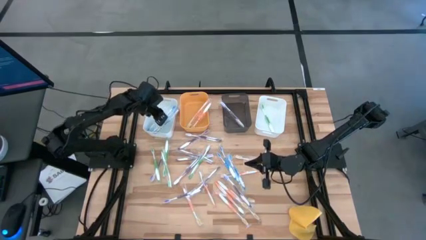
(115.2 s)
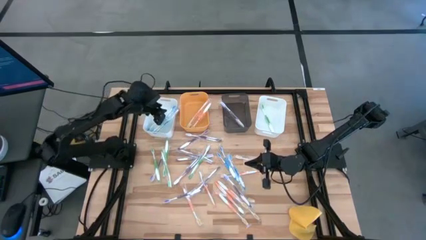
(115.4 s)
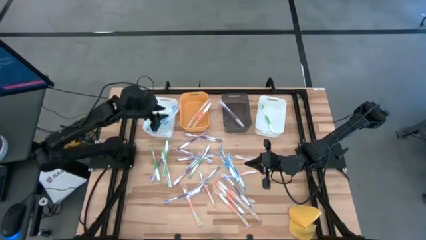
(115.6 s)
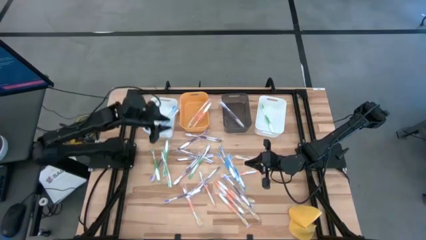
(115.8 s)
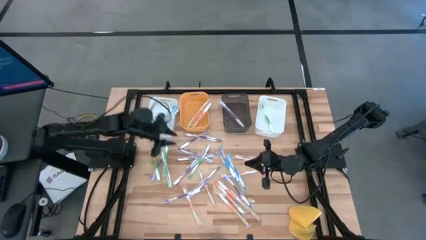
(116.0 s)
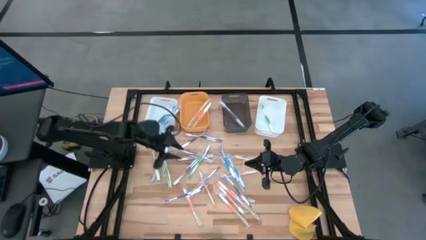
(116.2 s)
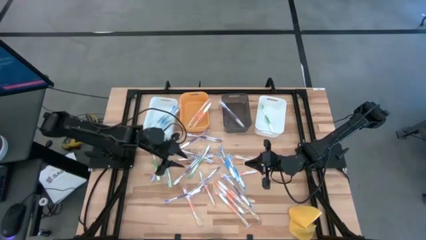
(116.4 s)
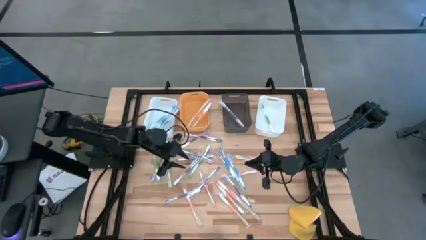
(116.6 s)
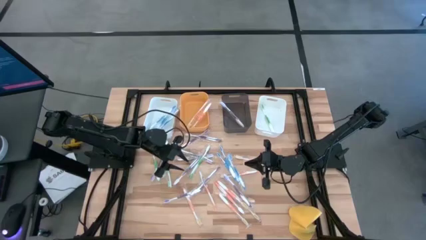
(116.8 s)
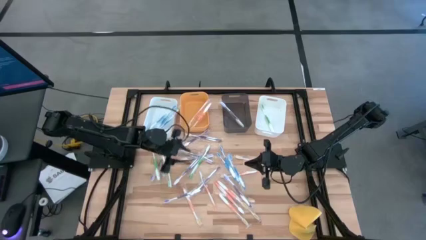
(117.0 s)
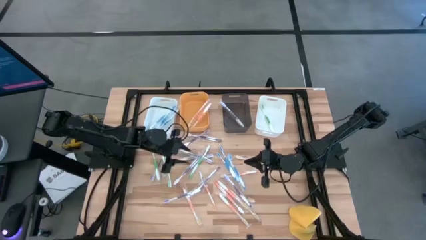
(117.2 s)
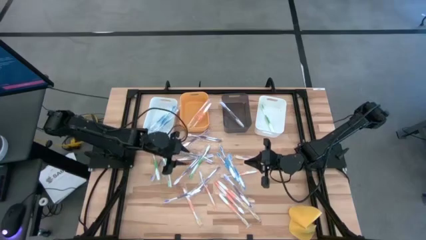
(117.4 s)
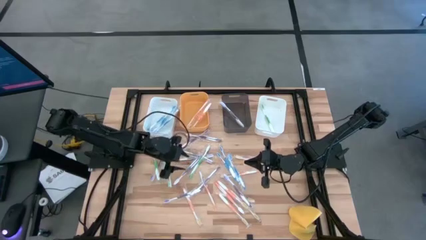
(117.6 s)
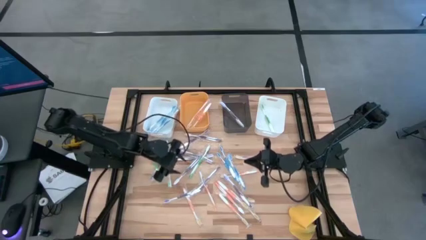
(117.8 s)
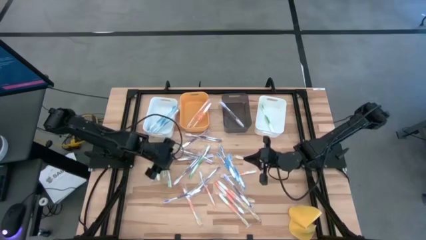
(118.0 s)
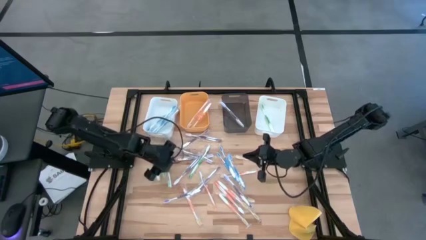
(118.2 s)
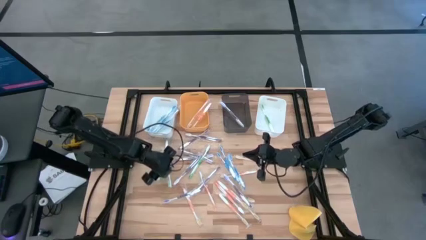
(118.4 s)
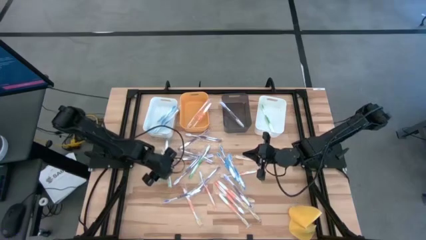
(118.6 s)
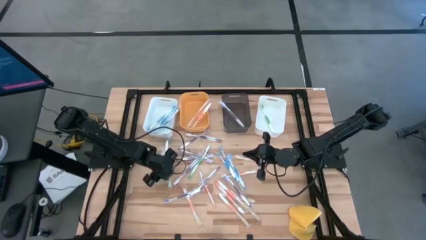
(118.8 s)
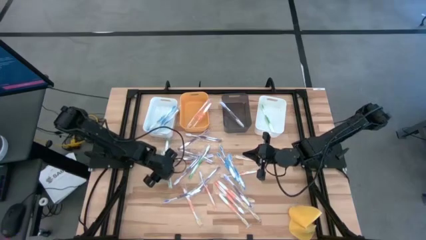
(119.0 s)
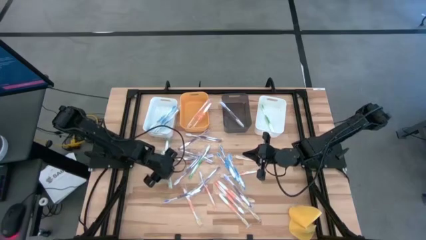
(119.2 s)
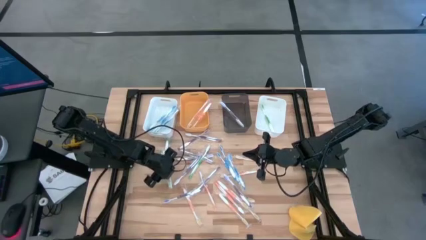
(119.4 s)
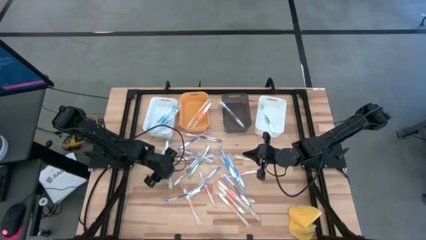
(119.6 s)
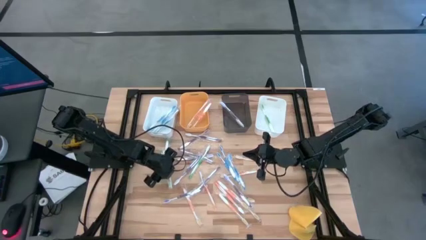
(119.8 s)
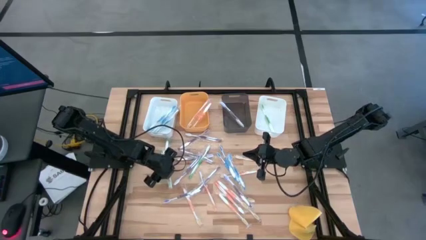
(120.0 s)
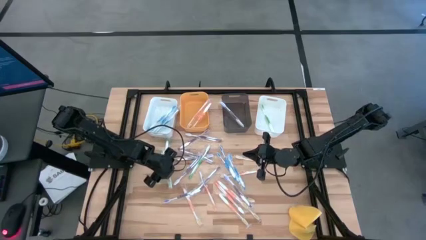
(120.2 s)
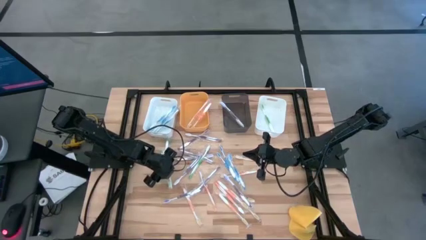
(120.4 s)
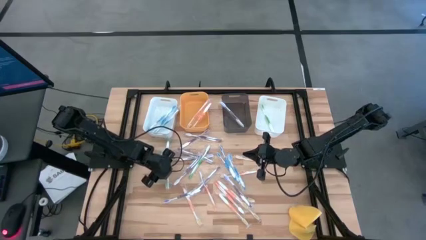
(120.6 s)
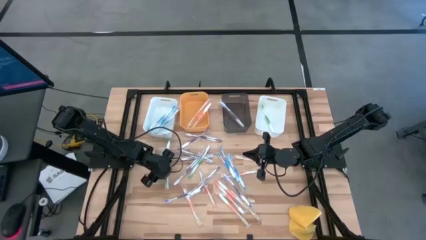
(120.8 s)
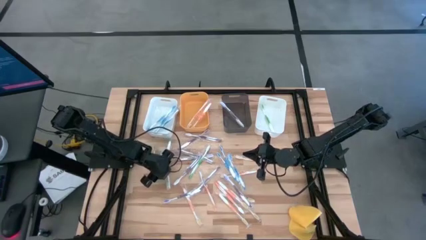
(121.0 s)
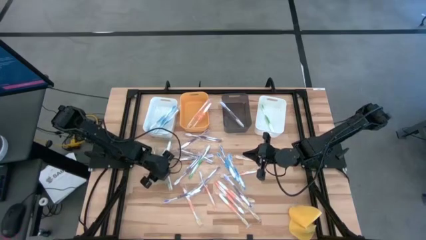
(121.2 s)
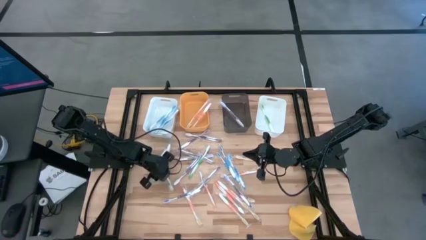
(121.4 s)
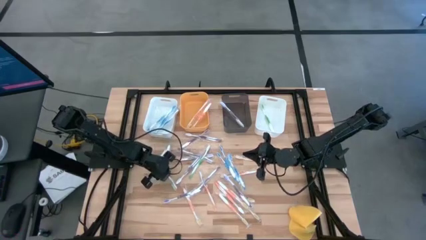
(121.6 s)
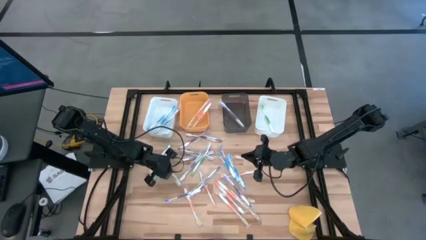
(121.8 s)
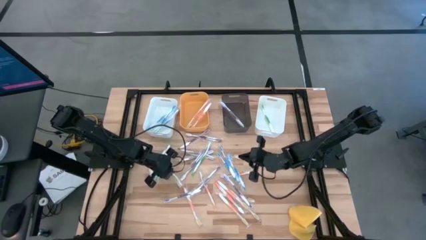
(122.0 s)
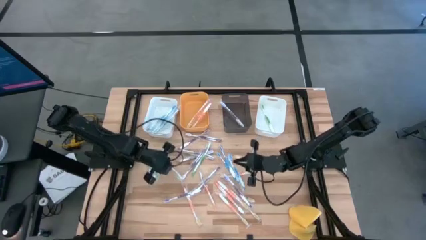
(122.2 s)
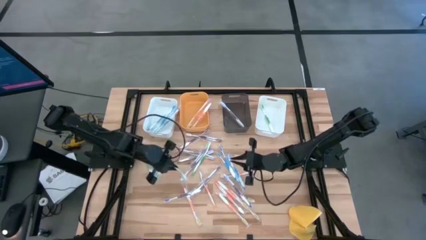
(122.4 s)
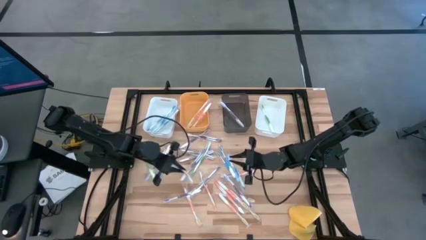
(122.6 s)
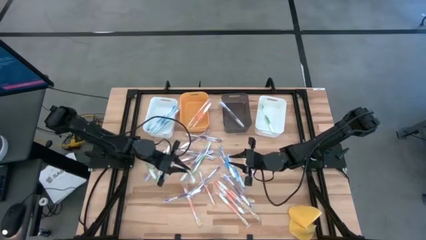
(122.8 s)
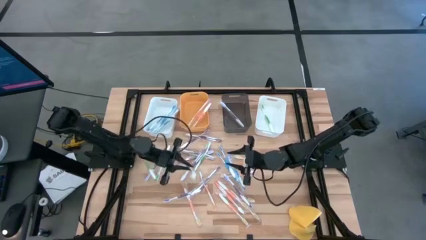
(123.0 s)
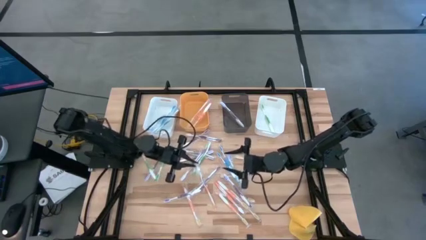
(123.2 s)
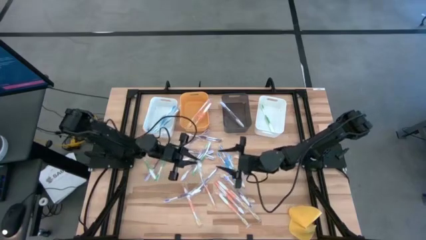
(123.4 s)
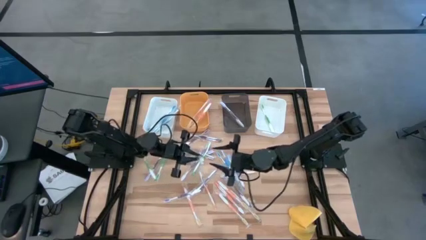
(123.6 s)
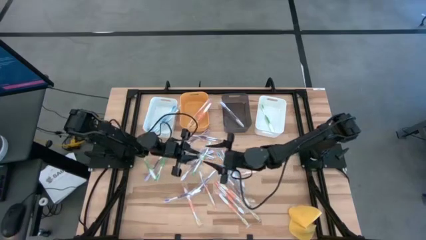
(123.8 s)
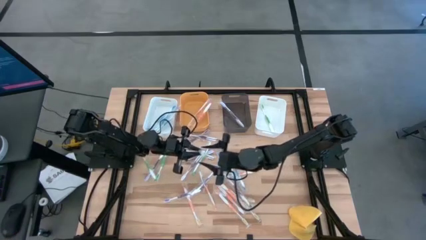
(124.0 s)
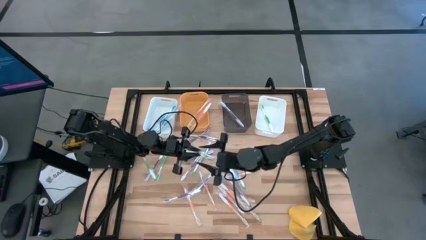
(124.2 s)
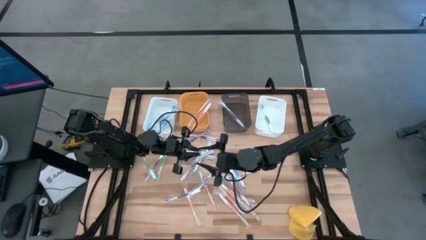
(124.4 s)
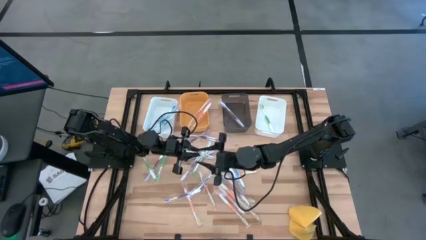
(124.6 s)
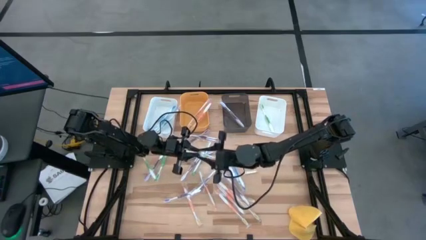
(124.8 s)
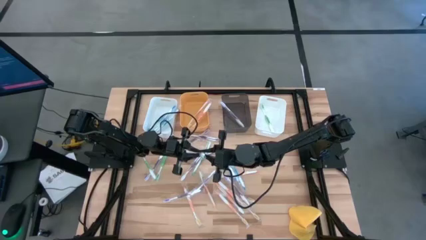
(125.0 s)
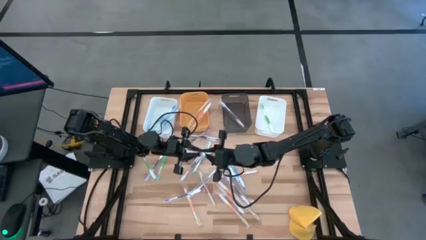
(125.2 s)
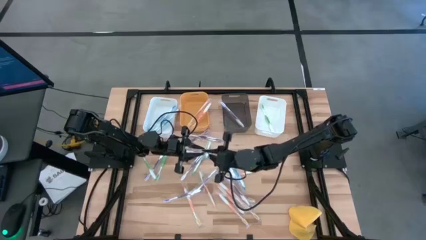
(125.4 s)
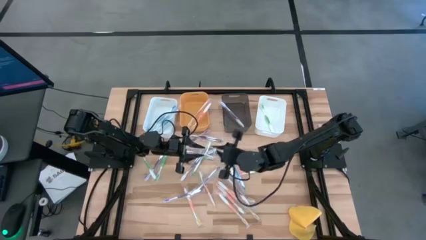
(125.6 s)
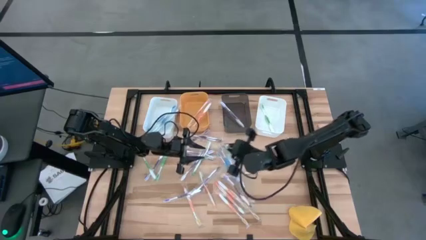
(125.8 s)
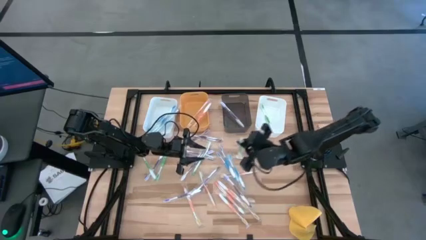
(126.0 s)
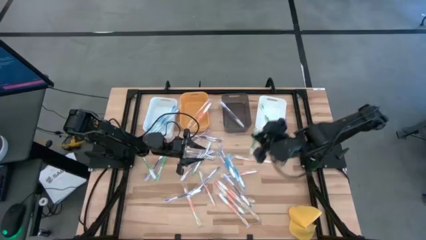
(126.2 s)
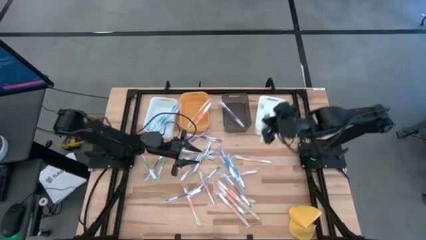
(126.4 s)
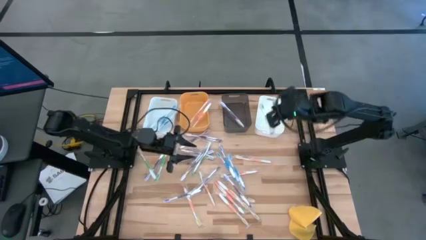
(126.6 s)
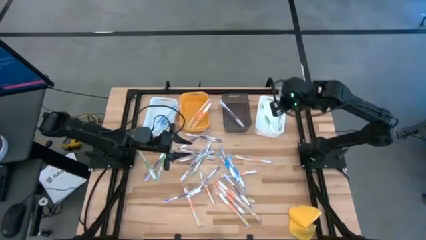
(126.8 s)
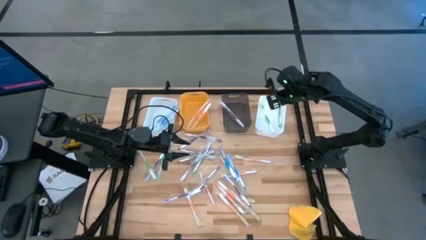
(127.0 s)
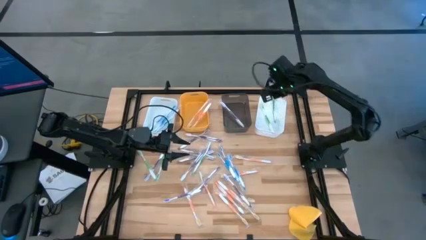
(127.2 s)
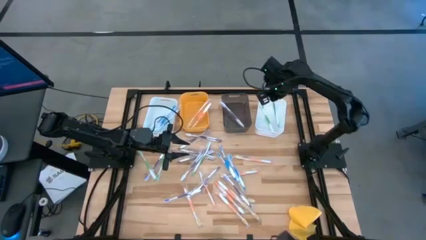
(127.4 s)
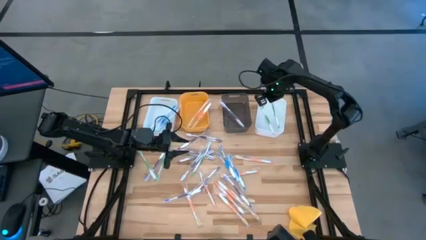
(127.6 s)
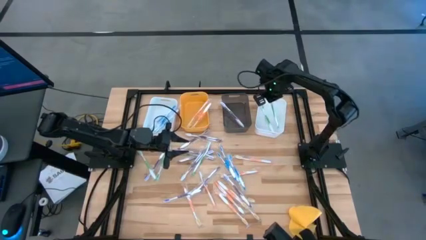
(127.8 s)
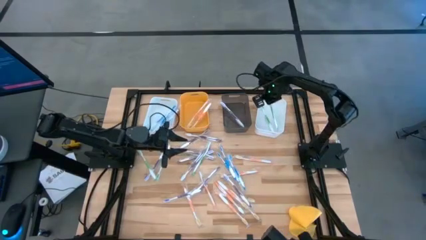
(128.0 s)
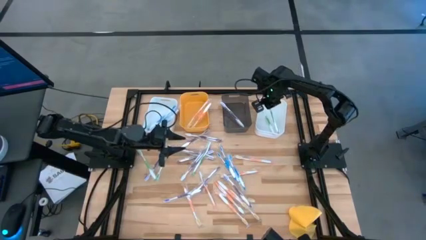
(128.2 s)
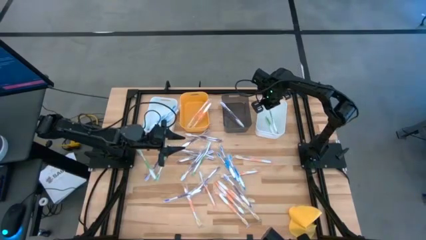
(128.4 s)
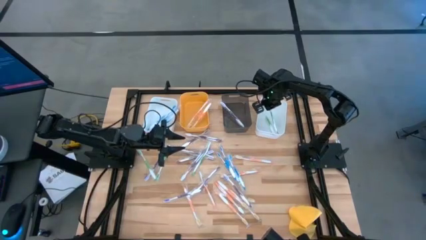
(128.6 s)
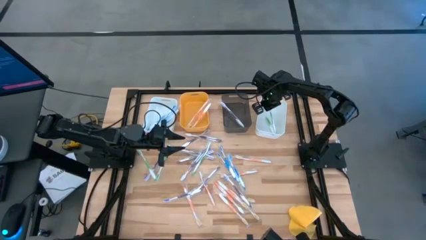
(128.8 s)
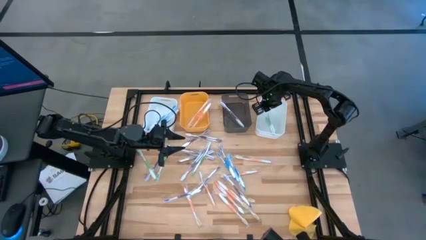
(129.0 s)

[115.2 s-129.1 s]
Task: Pick & Place Toothbrushes
Put the green toothbrush into right white the bin

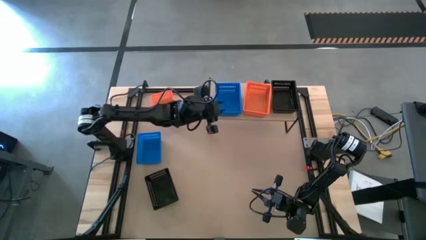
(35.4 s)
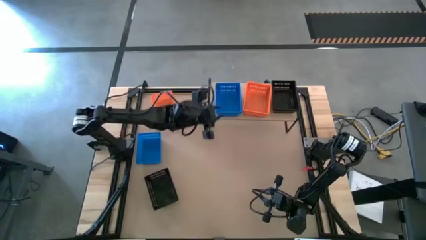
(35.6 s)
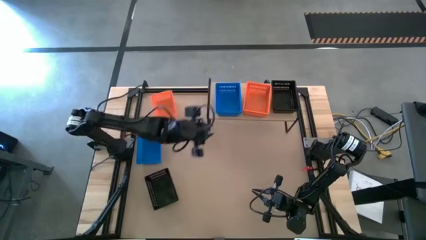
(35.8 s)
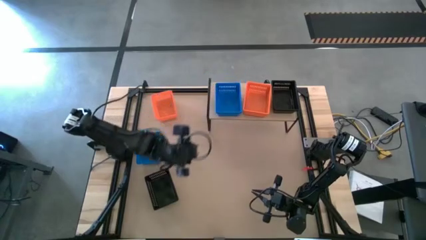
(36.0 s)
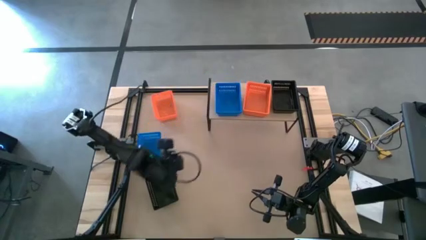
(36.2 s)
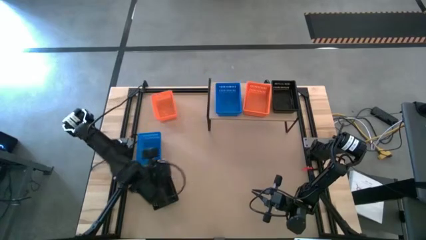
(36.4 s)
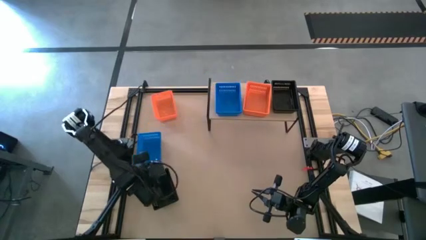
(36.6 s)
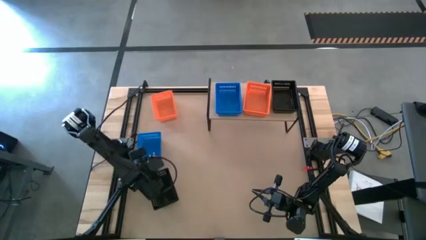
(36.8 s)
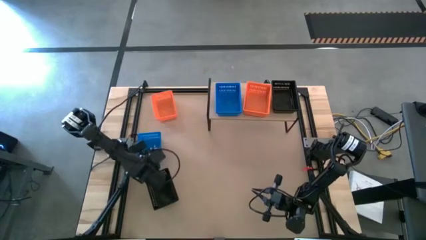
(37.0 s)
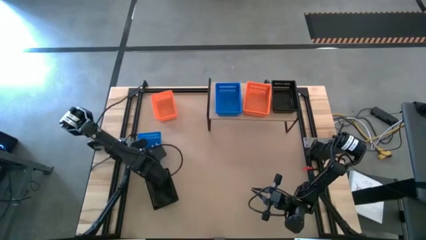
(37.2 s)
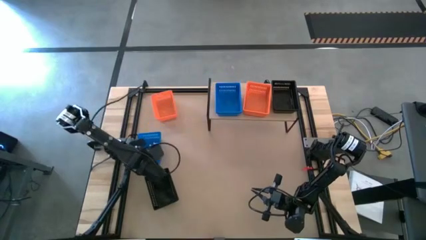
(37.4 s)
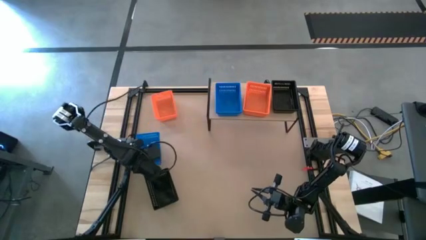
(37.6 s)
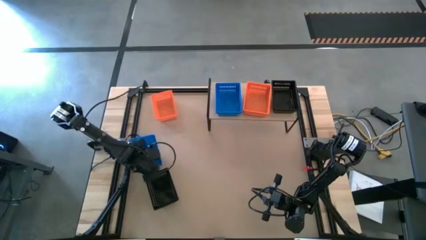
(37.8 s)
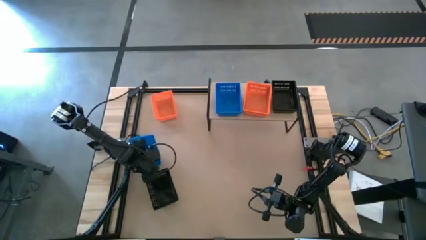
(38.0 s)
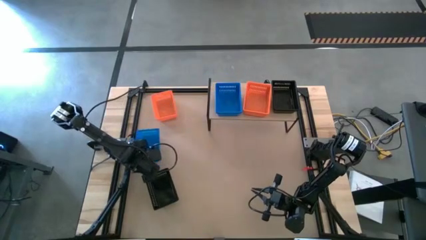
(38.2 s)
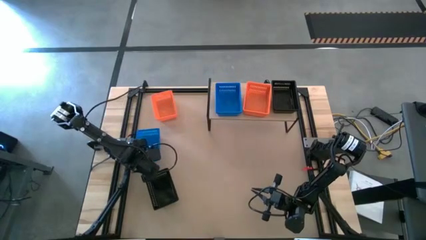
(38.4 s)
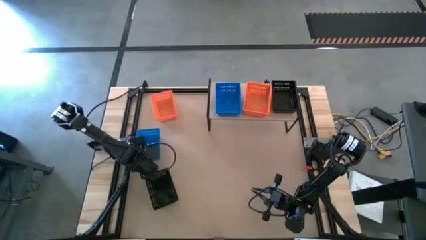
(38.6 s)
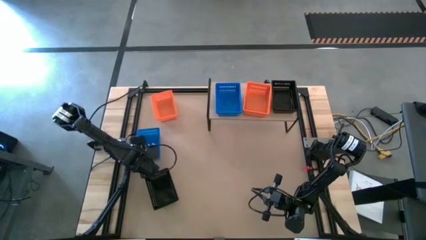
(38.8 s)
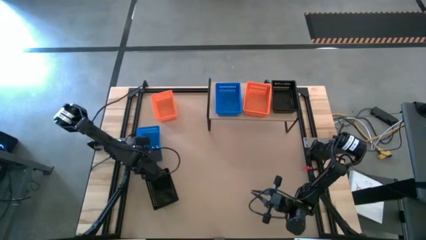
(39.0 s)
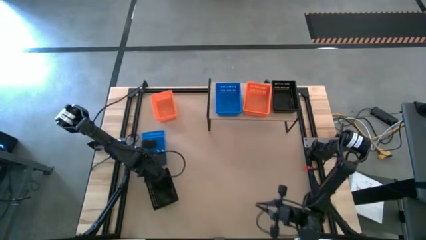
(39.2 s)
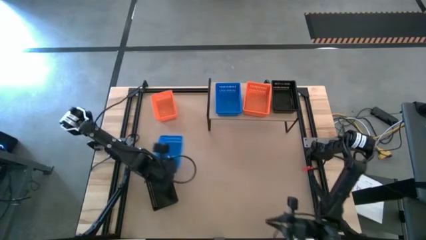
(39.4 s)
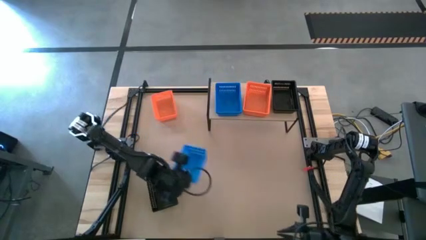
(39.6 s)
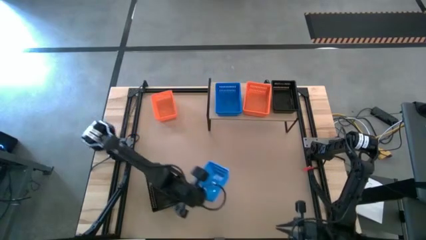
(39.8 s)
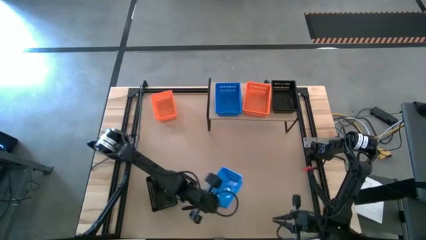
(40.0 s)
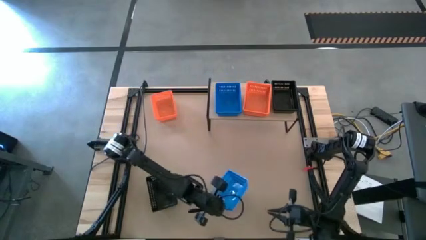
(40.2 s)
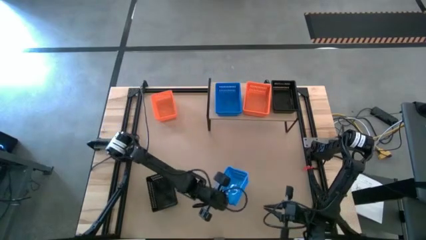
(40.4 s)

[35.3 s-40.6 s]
Task: Stack baskets on shelf by color
Move the blue bin to the center of the table
